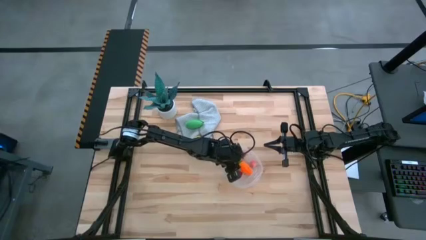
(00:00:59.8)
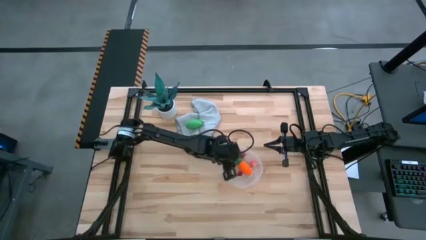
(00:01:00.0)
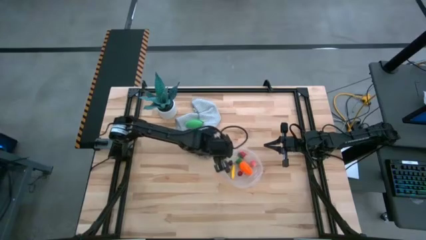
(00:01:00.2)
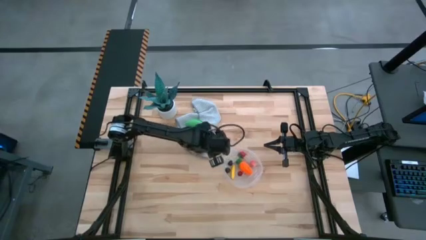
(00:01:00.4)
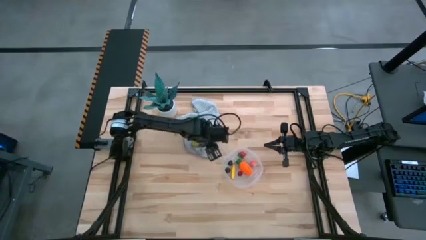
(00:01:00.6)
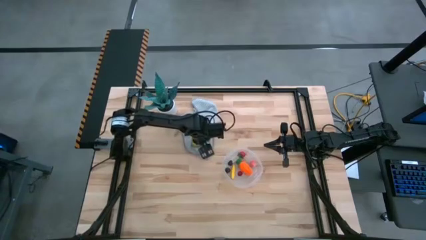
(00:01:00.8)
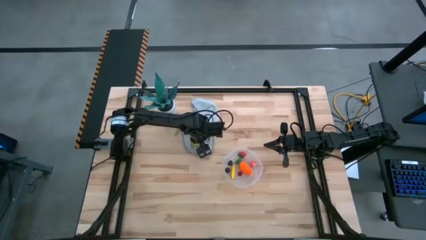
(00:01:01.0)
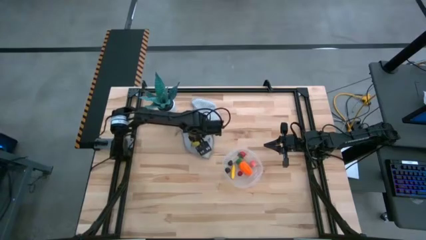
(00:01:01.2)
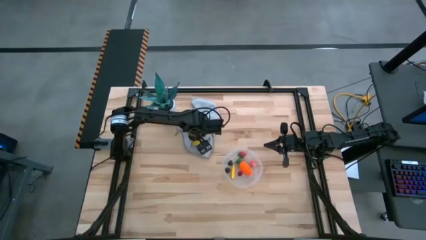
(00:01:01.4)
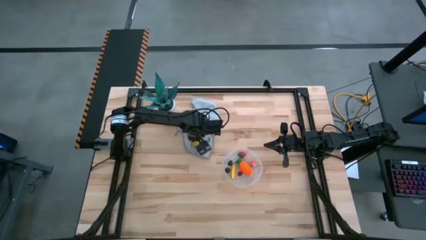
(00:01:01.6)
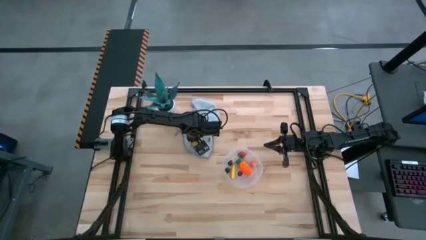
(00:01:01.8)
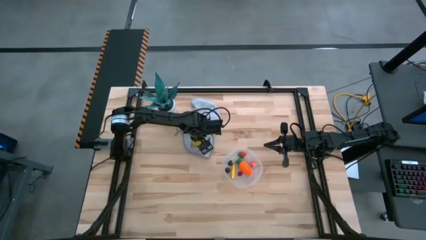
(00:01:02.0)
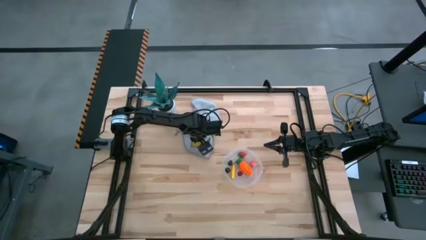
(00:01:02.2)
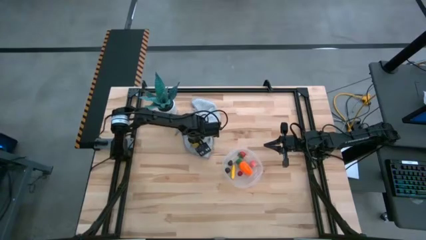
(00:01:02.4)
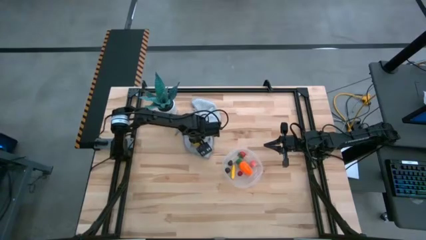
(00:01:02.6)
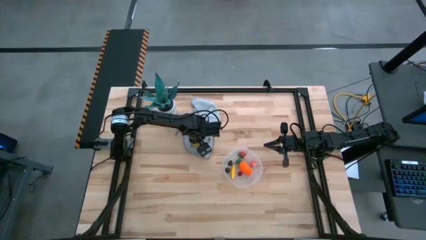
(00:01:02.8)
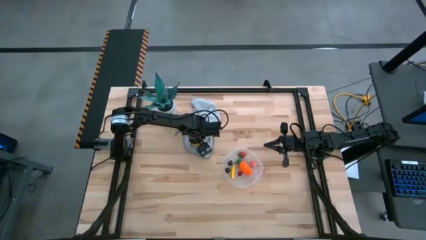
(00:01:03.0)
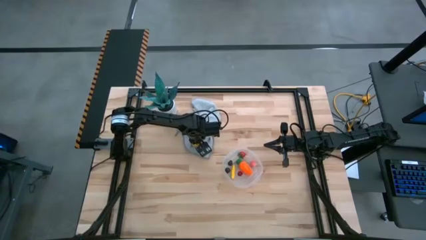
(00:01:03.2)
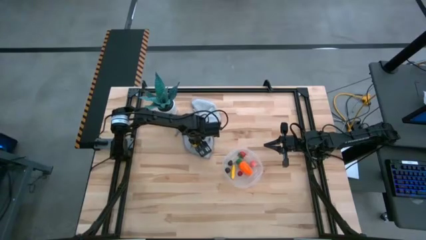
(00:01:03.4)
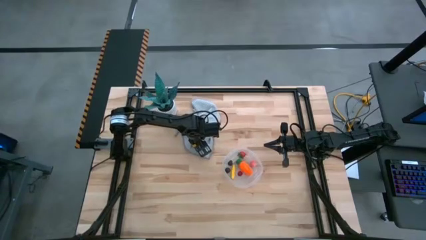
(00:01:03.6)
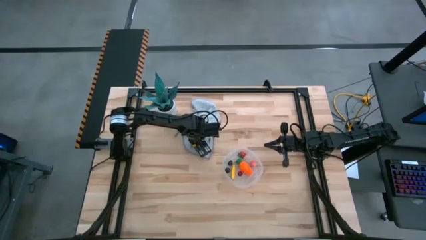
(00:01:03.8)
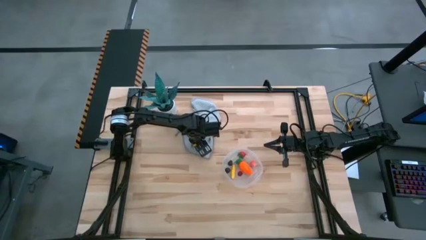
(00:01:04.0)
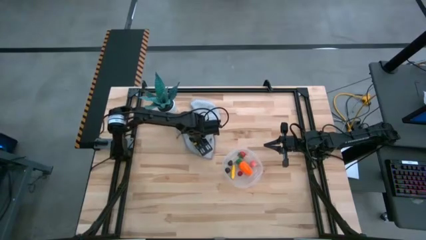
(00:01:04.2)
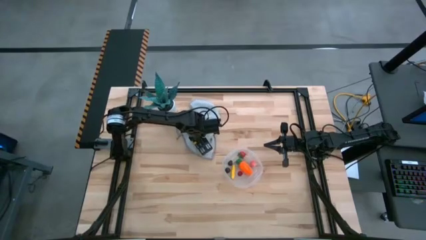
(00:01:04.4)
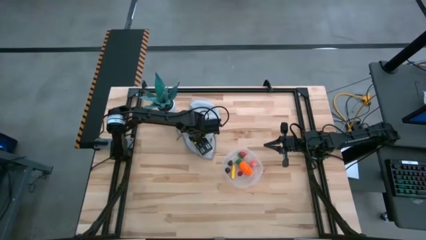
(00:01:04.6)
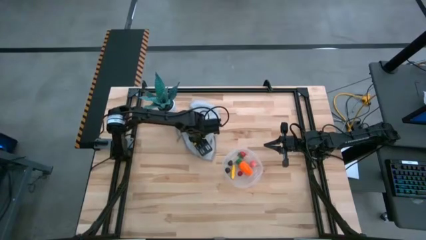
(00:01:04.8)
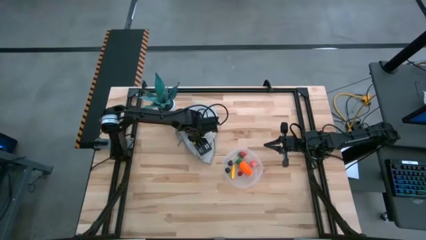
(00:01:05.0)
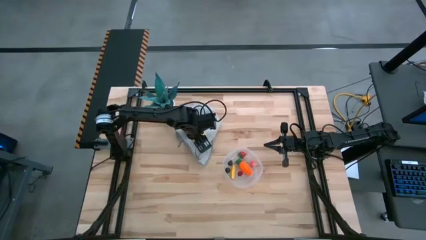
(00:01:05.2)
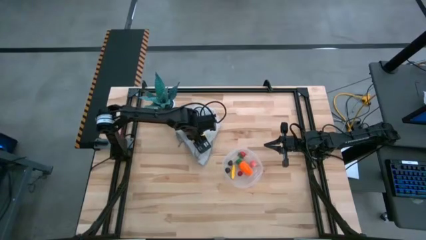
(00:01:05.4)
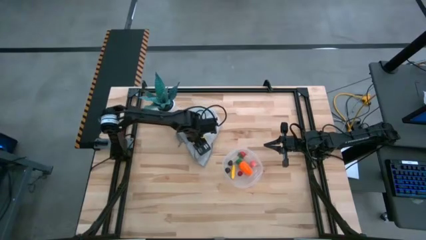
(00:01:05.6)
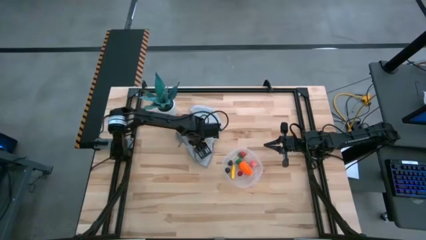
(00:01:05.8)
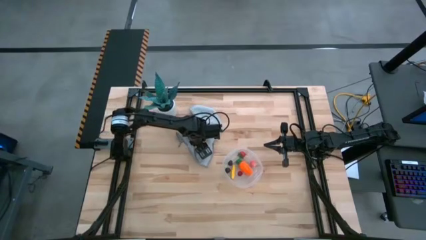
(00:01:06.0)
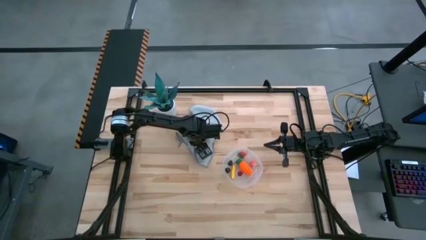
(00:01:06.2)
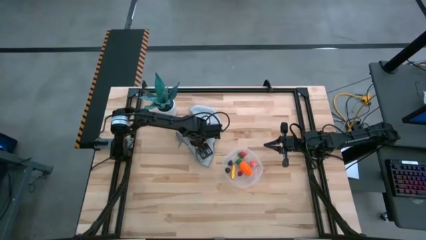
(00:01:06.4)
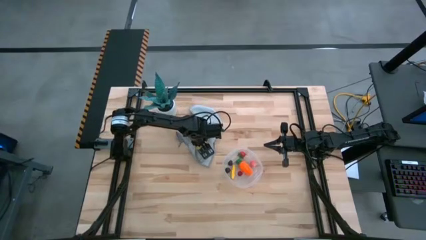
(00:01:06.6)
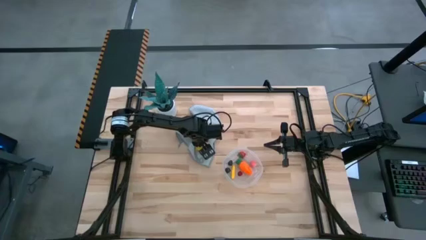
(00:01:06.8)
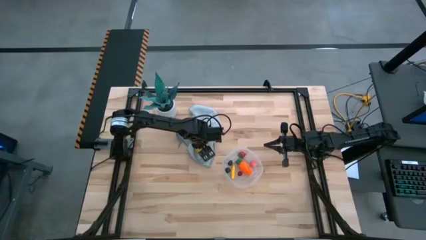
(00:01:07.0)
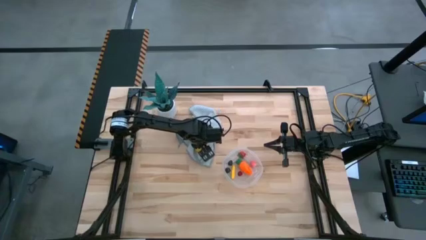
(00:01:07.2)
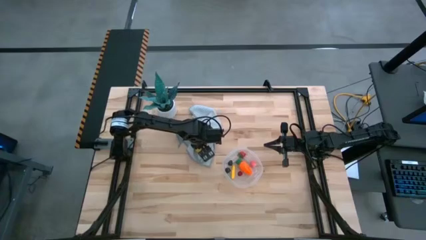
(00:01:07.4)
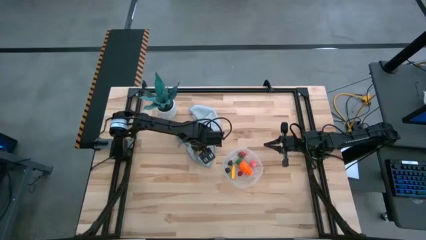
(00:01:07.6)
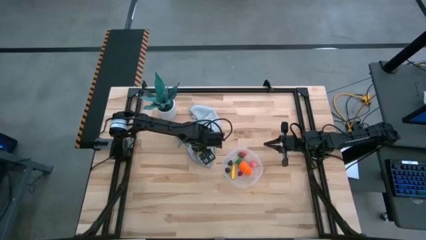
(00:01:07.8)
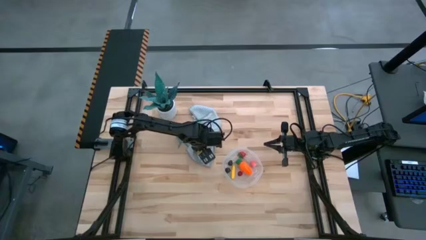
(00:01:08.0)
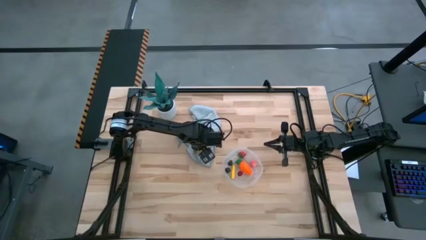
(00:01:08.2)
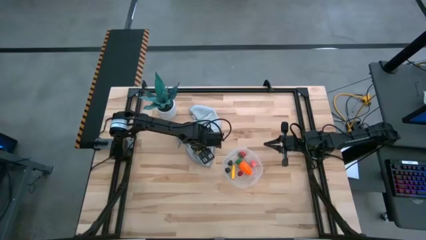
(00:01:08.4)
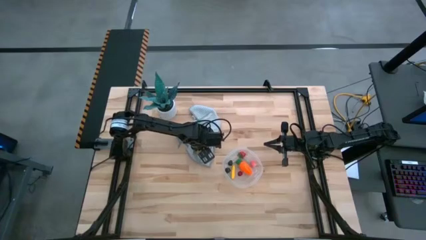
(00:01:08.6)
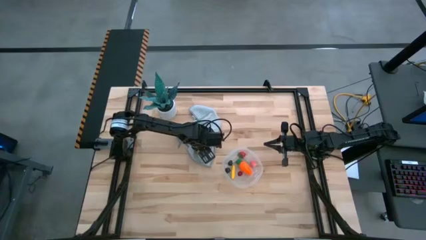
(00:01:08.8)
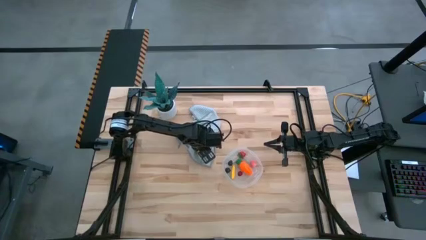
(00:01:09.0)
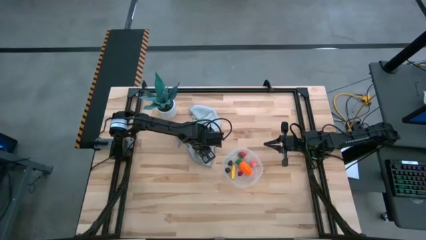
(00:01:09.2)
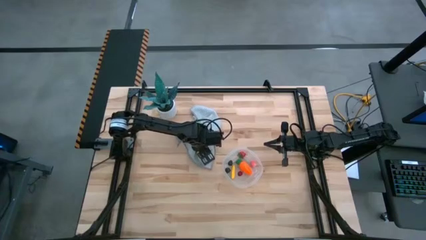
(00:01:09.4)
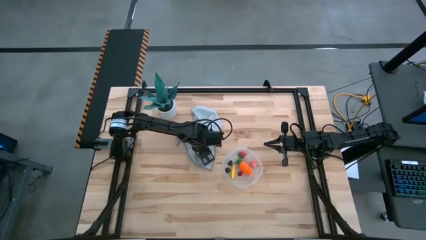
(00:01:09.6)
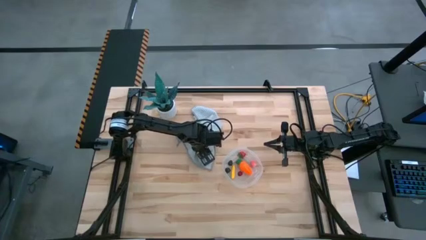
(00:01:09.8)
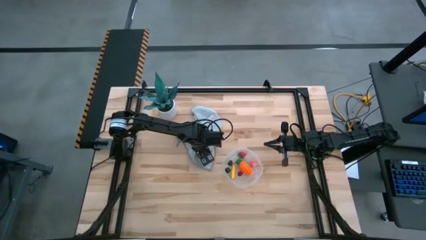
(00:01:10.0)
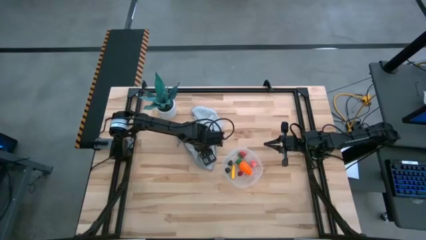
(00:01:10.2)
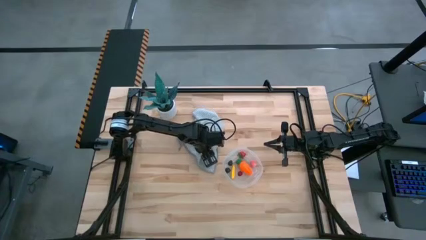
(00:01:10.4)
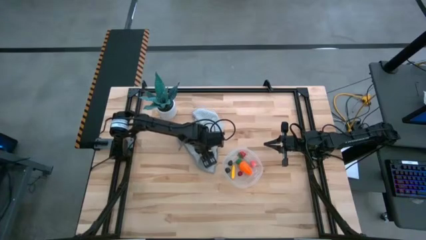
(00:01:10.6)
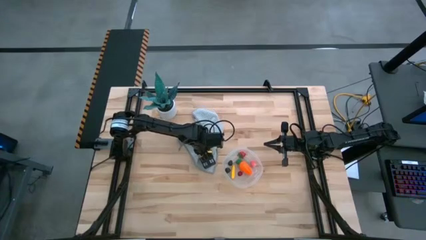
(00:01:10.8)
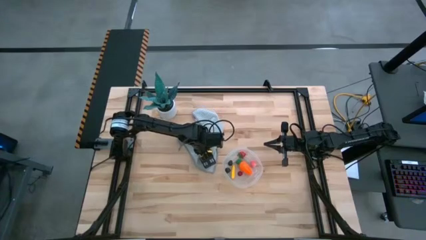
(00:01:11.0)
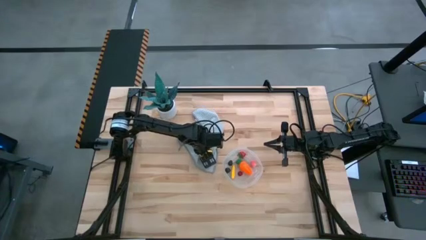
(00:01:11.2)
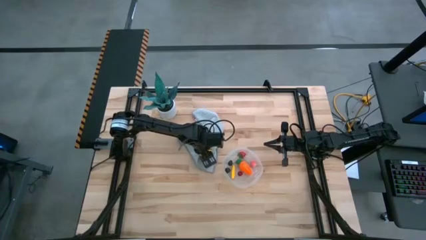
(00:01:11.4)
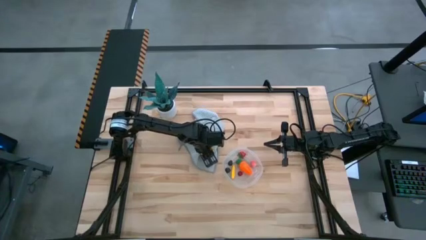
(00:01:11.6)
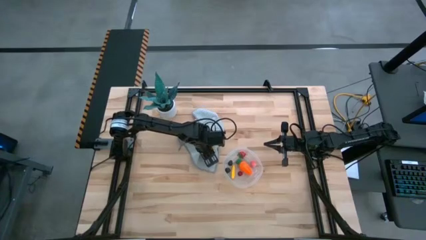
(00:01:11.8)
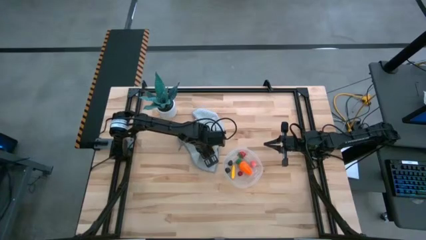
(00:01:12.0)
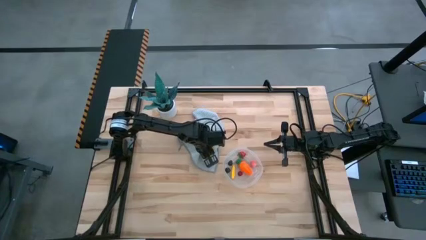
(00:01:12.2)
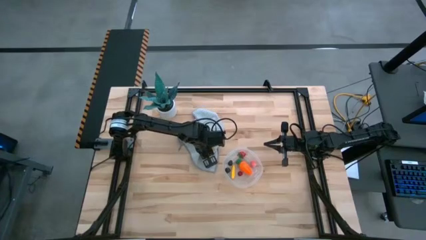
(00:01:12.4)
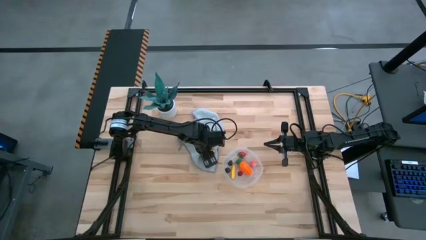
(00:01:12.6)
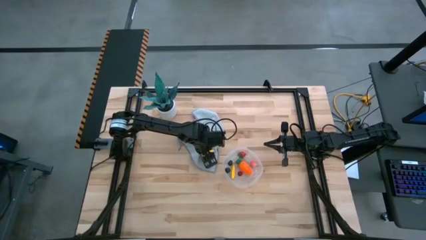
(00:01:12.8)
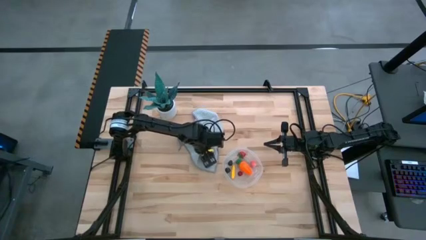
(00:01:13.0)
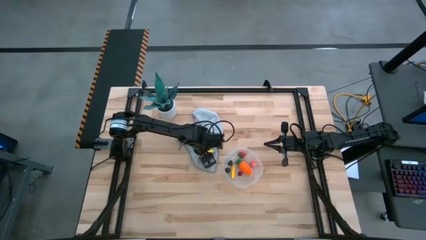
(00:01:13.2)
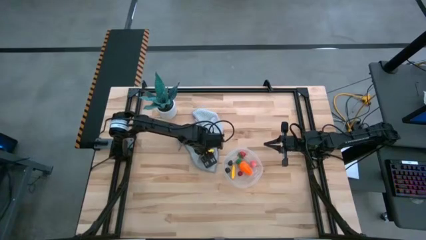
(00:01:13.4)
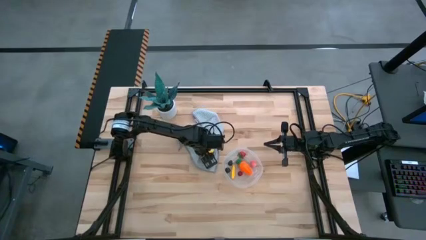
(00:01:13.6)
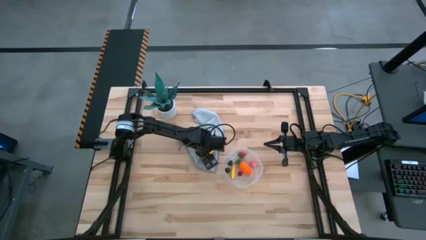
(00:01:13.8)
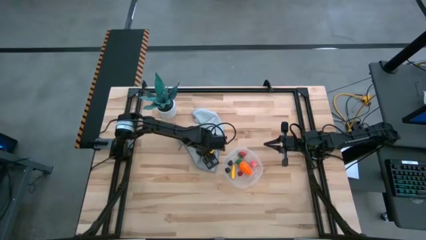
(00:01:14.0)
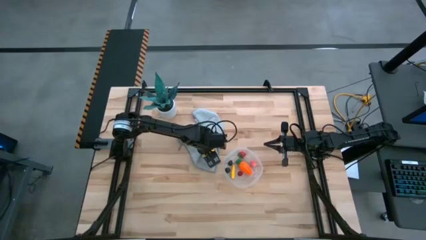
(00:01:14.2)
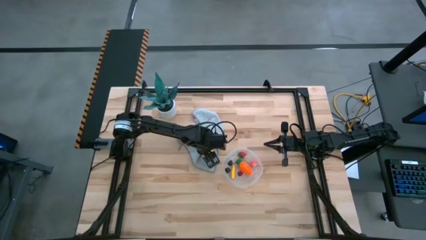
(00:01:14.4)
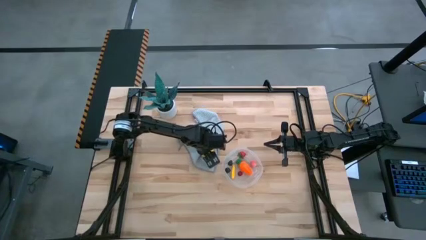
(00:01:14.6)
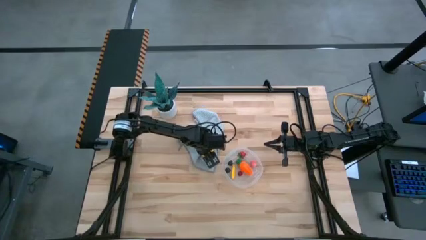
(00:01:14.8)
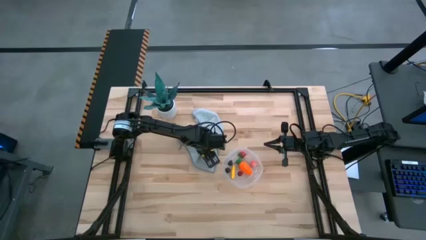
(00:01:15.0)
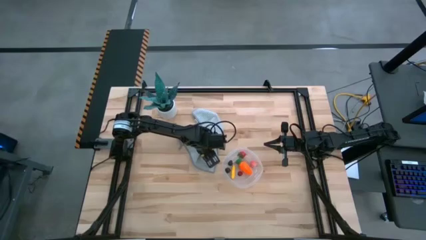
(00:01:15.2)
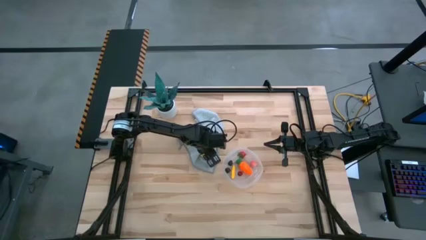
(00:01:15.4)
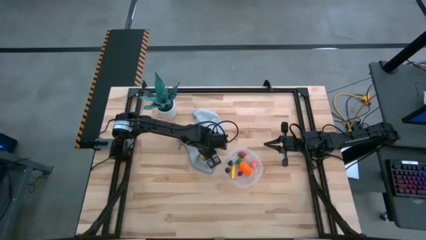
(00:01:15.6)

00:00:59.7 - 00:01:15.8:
Task: Pick and placing Produce into tupperware
Put the lemon into the transparent bin

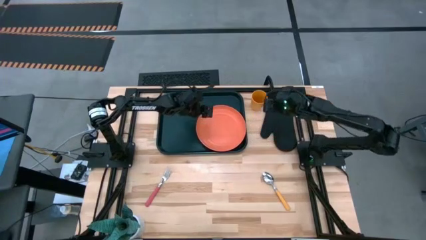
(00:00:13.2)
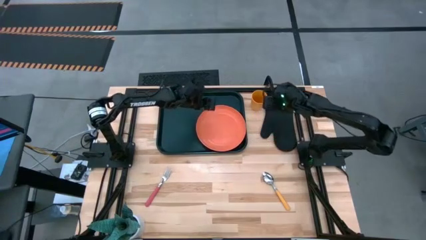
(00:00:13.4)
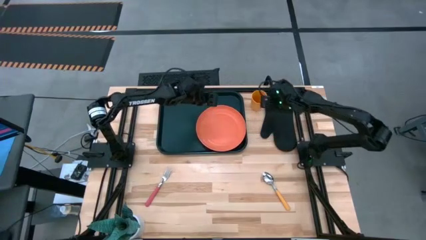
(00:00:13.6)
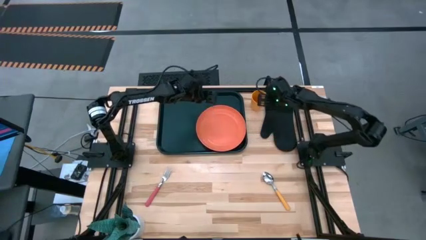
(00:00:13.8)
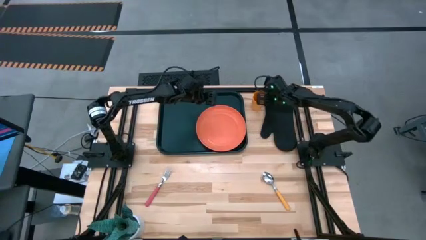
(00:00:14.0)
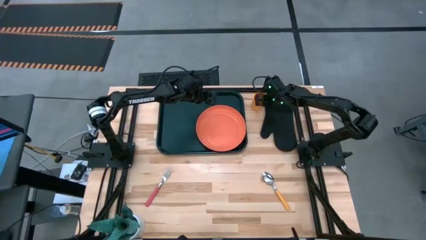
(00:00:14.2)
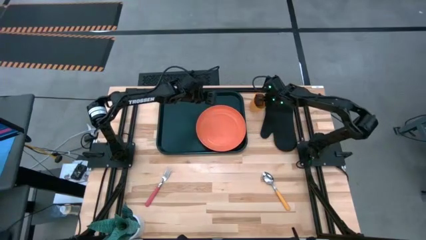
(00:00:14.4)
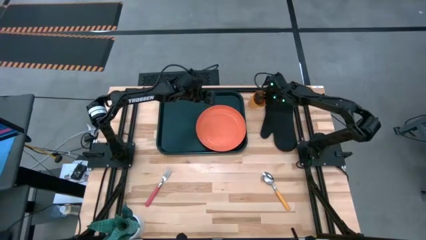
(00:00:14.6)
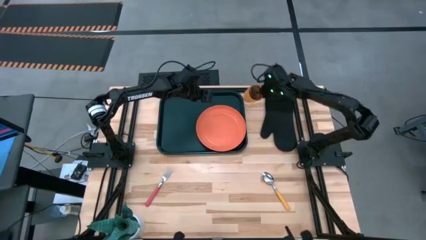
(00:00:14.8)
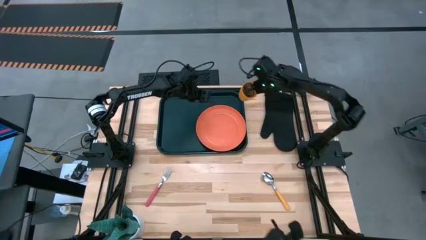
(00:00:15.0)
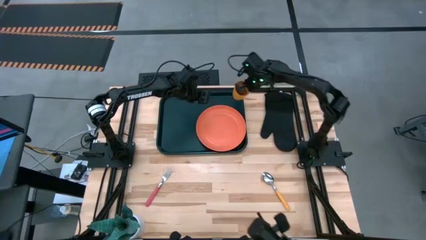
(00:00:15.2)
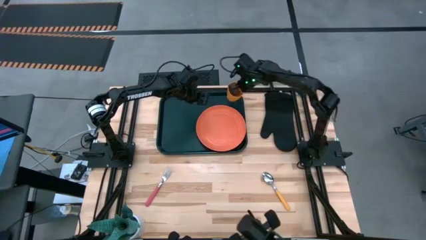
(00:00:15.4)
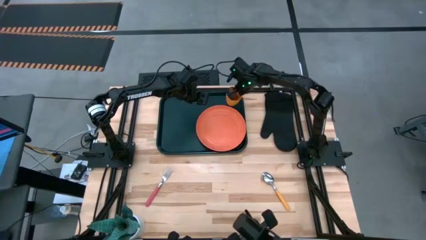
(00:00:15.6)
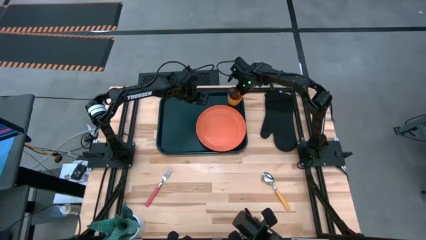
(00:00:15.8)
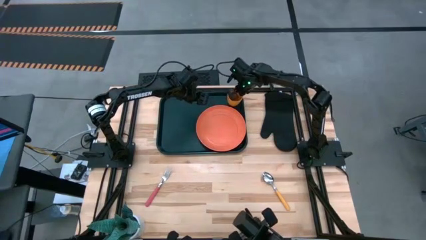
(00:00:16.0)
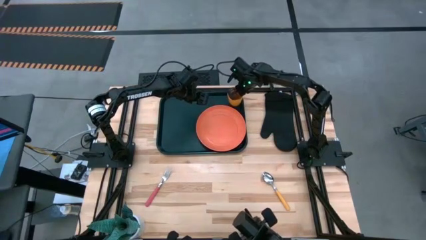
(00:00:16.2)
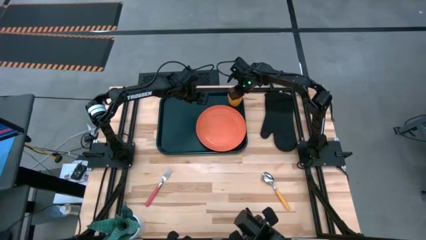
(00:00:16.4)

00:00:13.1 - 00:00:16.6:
Task: Pick and place plate/cup/fork/spoon on tray
Put the yellow cup on the black tray on top of the orange plate
